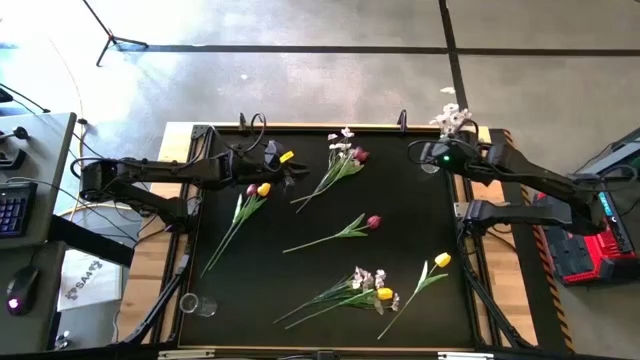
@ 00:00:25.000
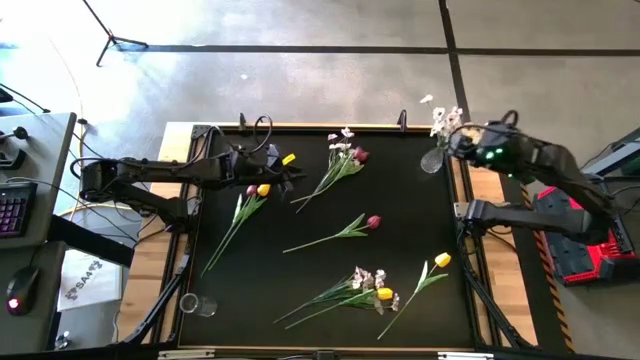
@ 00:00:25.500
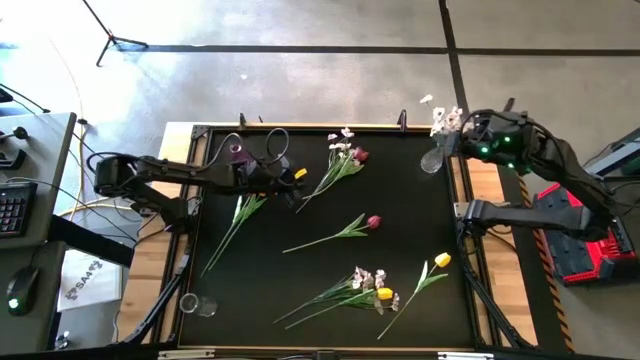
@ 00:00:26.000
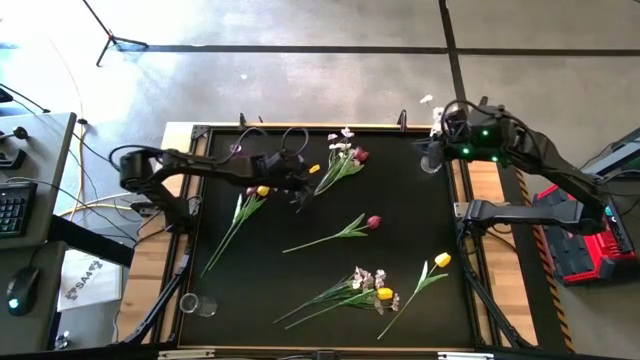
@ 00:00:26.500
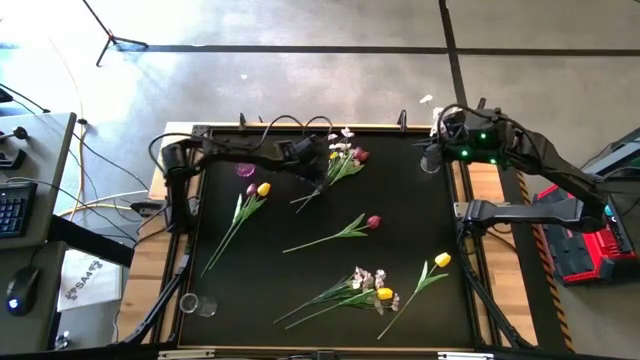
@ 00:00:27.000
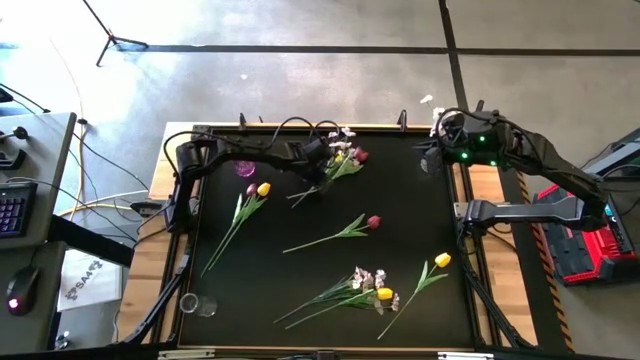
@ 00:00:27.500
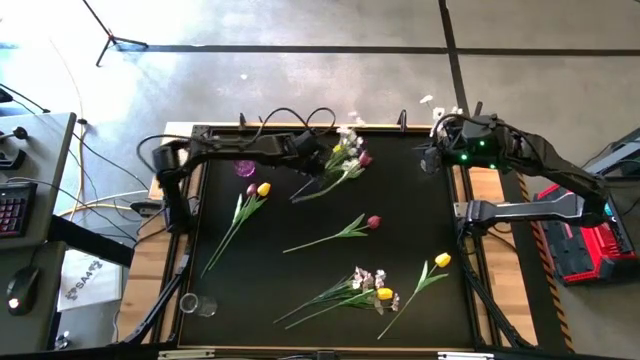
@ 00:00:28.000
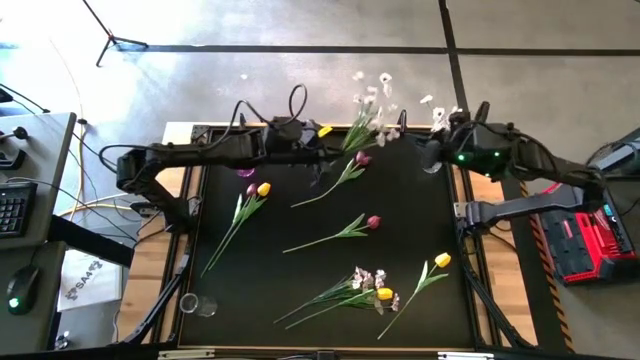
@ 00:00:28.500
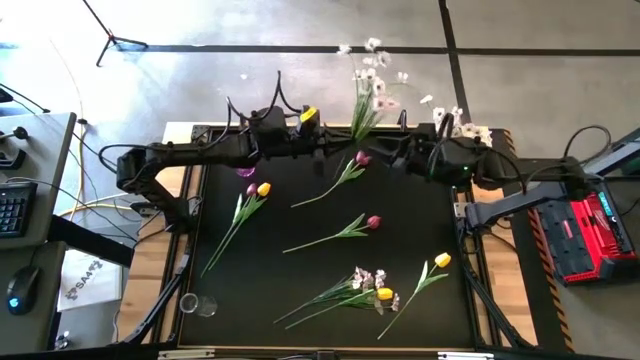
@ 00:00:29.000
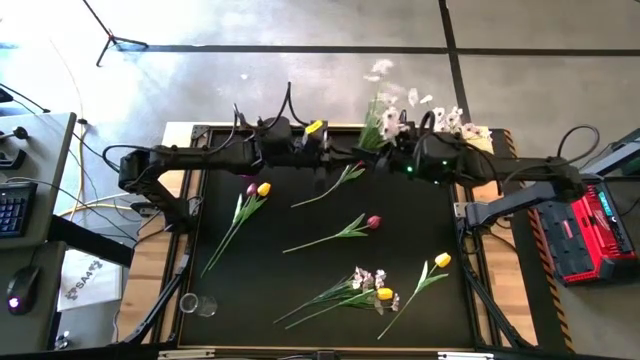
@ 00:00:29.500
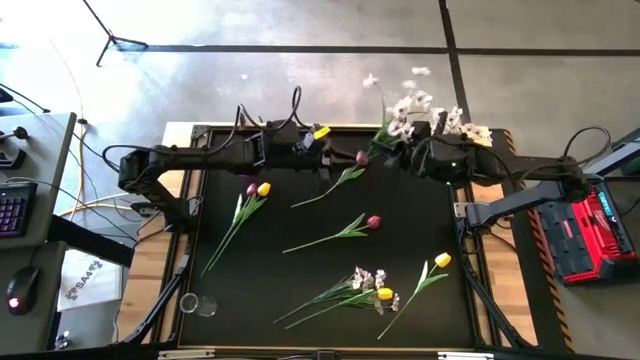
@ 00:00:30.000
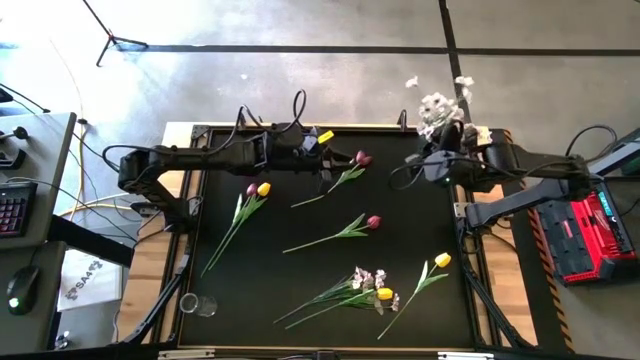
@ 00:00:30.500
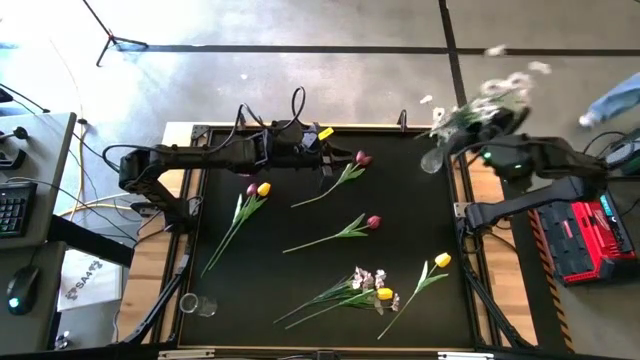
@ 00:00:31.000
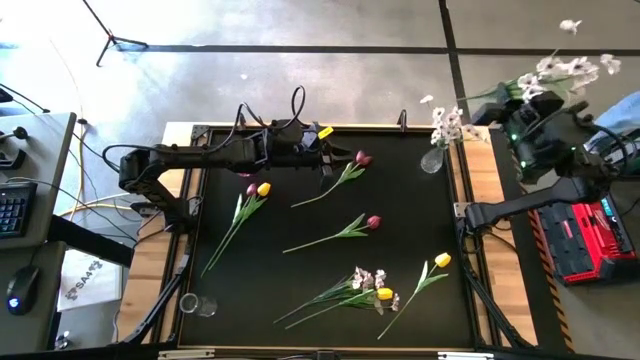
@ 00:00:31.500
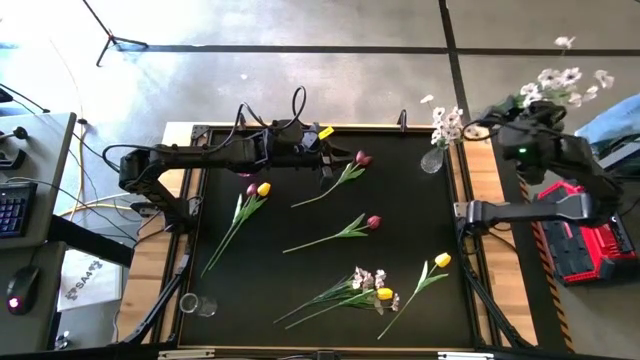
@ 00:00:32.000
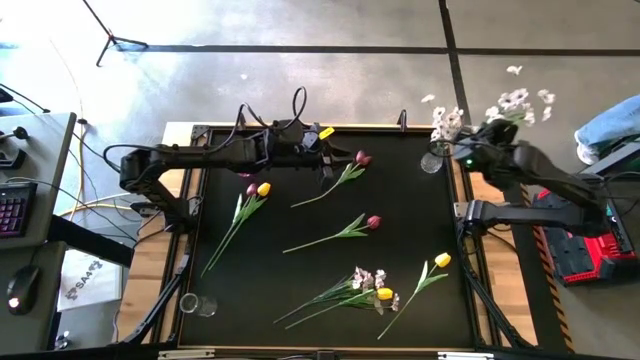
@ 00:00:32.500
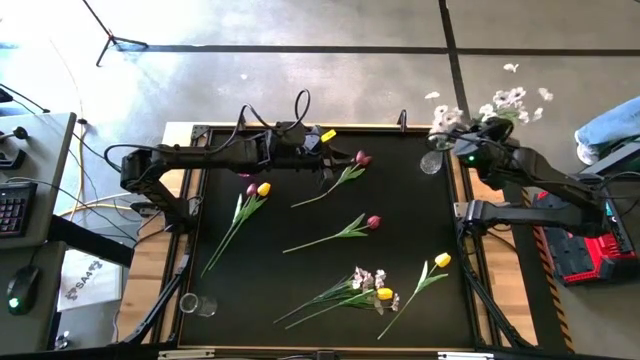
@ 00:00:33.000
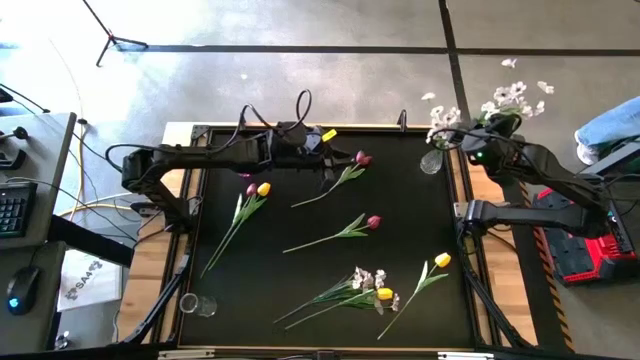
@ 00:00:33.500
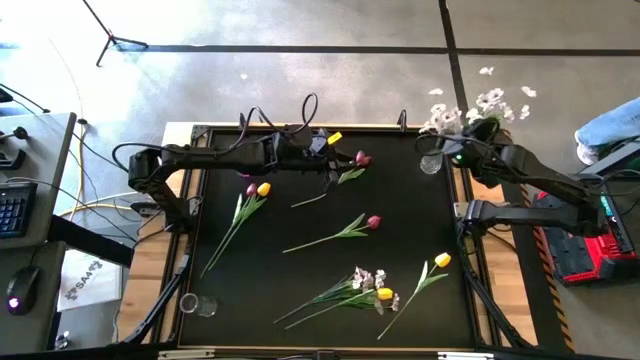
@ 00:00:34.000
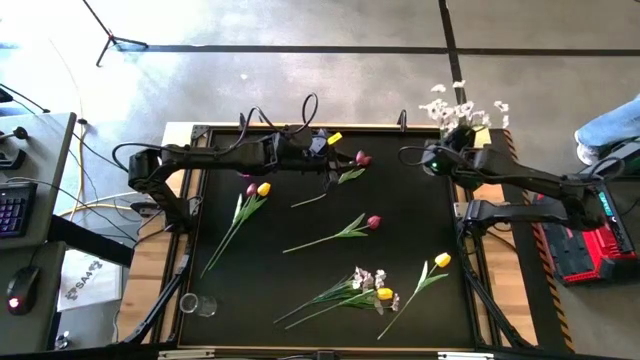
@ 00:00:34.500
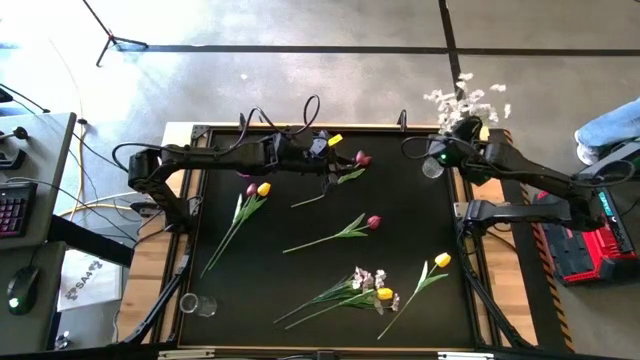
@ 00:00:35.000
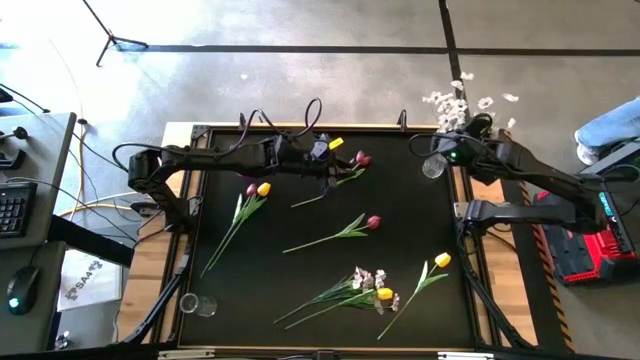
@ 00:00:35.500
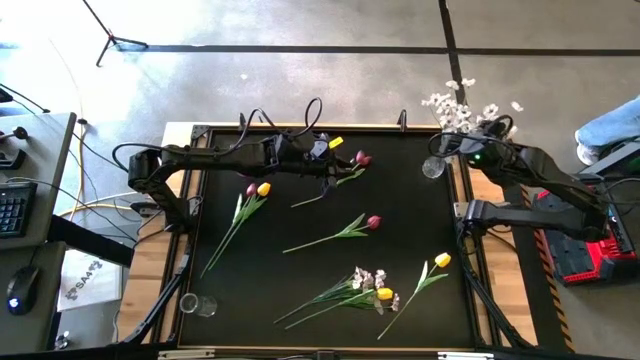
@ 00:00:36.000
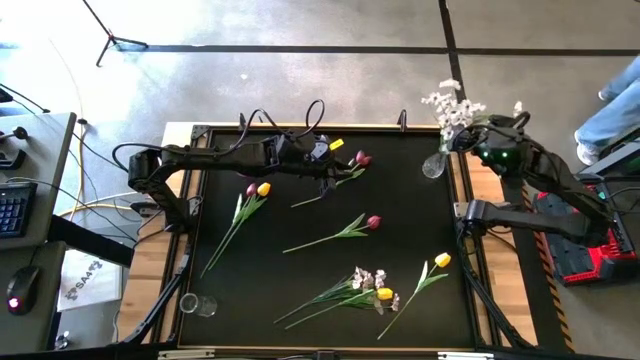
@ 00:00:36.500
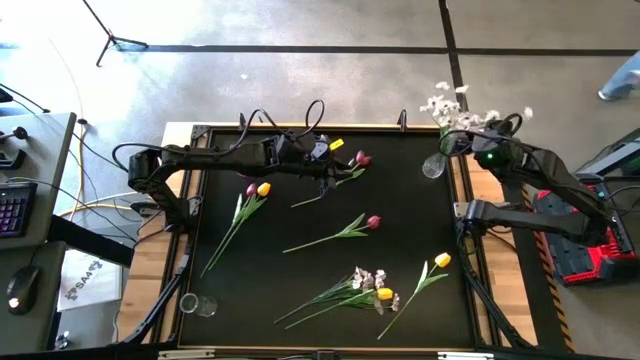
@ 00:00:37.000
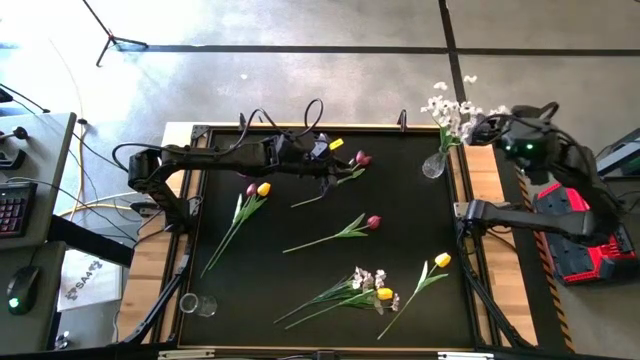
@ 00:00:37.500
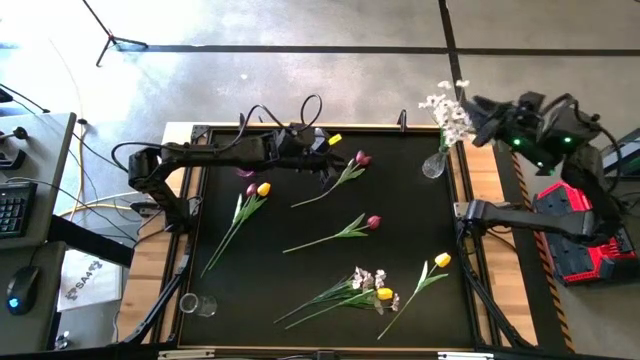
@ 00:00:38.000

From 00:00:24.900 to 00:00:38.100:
Task: Sort flowers into vase by color
Put the top white flower into the top right transparent vase

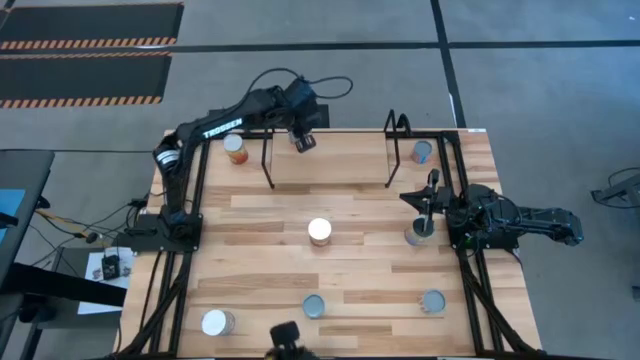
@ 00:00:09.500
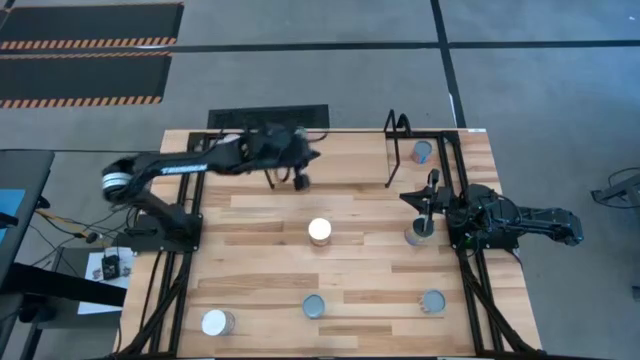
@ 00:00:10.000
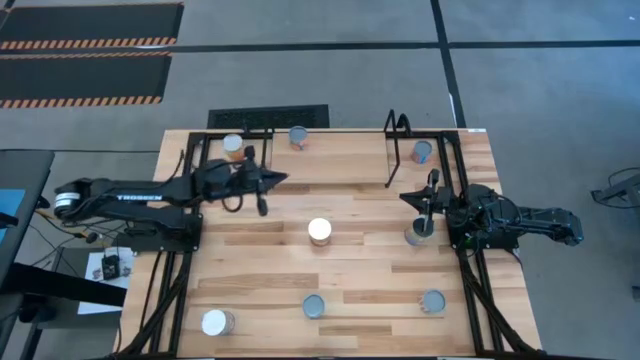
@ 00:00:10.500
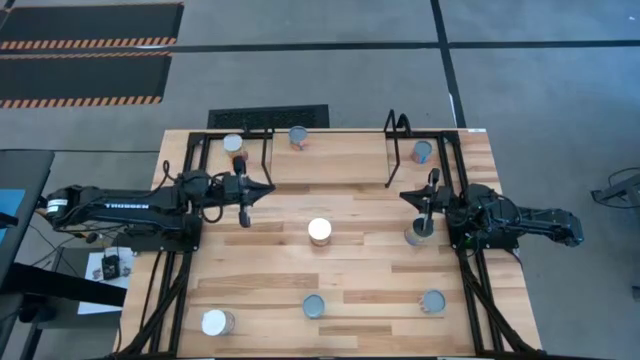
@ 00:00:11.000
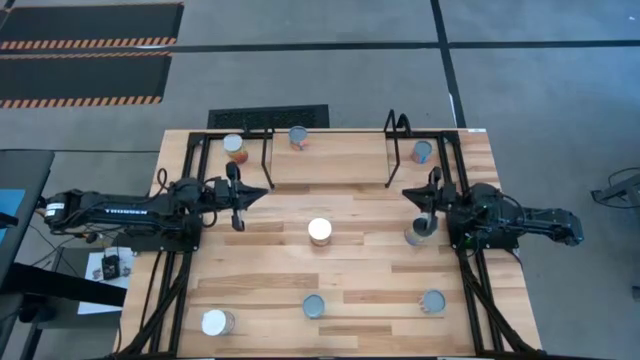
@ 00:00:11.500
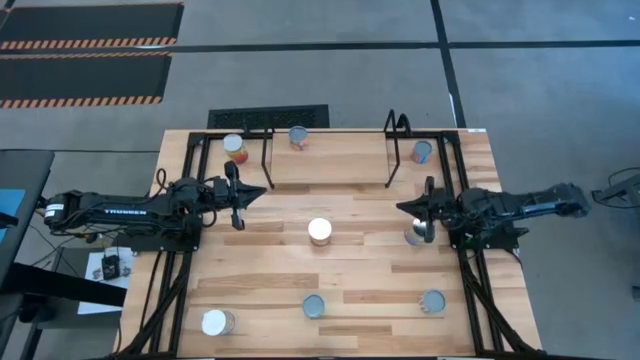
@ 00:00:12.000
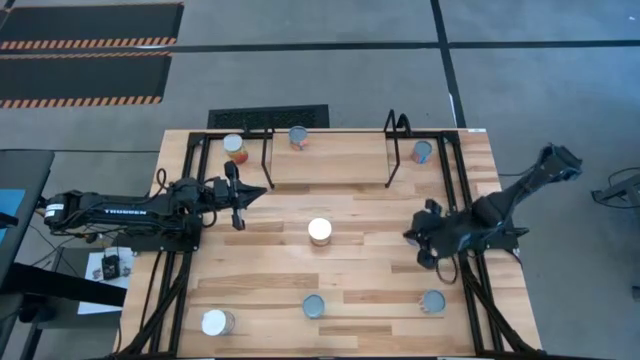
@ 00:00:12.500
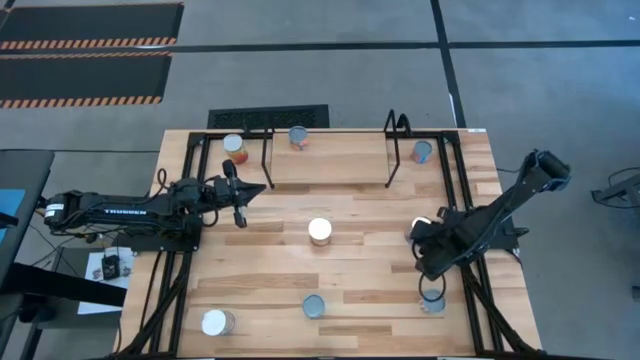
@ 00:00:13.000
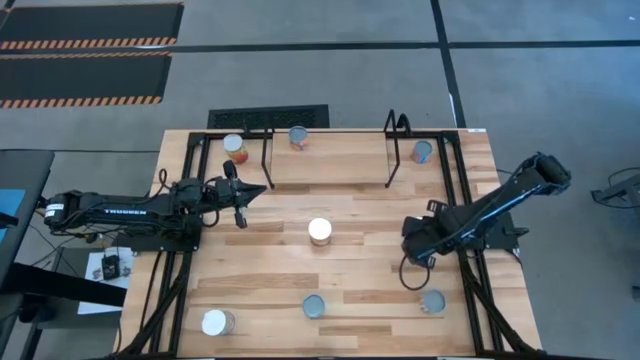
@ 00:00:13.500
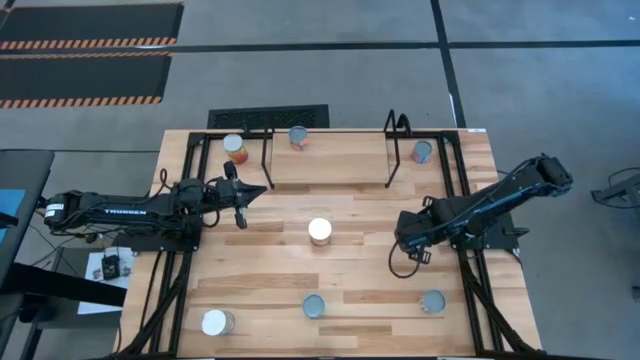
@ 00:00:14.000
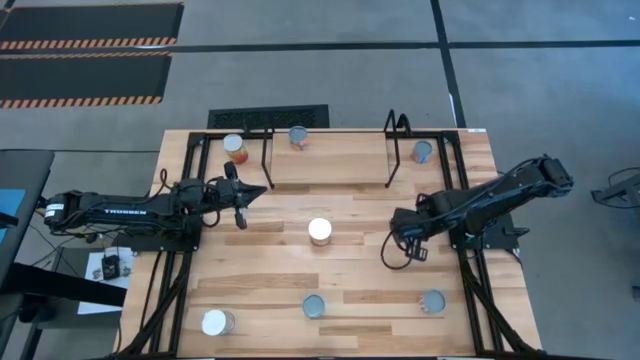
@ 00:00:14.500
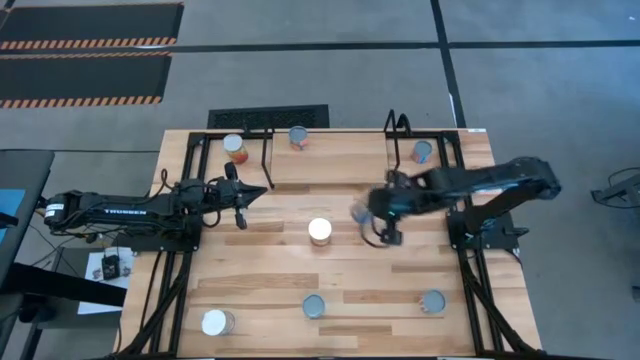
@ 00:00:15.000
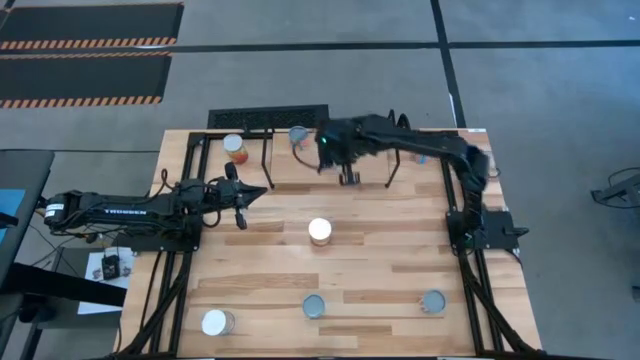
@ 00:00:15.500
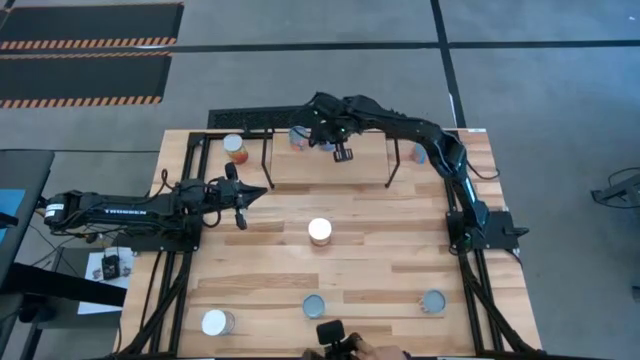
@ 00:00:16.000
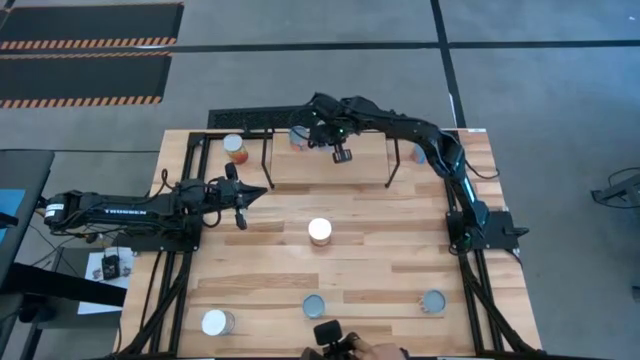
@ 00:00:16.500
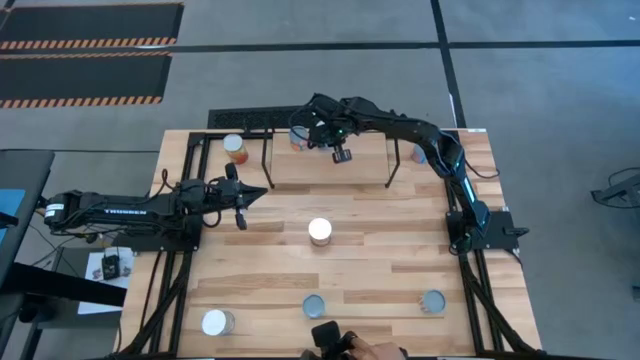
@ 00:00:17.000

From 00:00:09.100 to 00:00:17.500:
Task: Pick and place cans onto a shelf
Put the right canned peaches on the shelf
